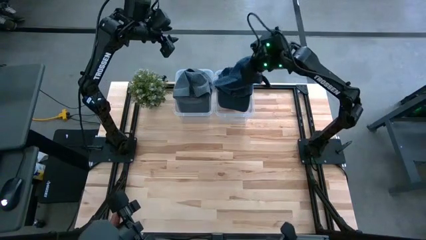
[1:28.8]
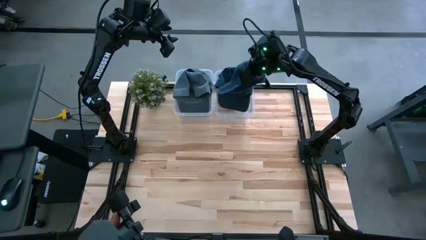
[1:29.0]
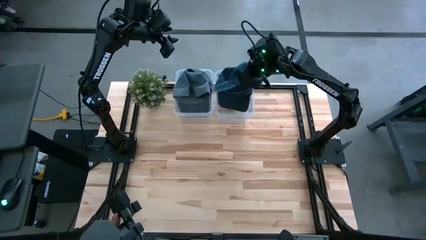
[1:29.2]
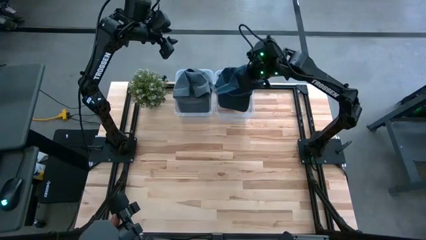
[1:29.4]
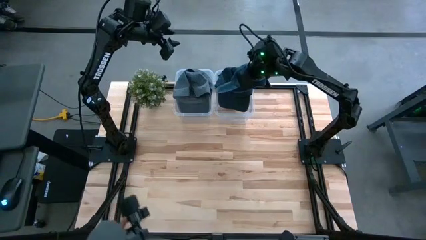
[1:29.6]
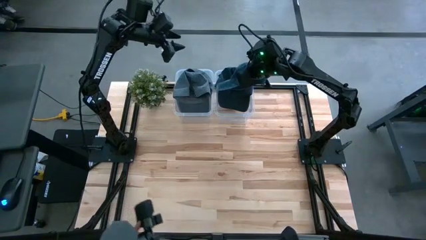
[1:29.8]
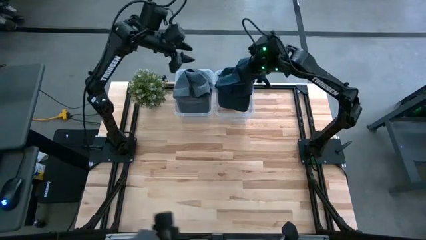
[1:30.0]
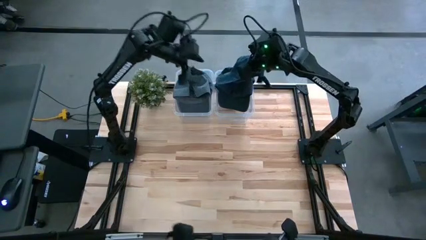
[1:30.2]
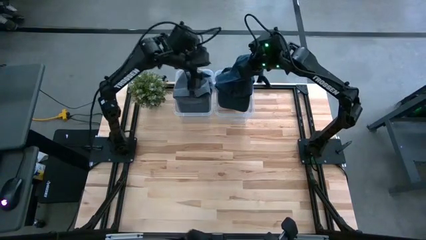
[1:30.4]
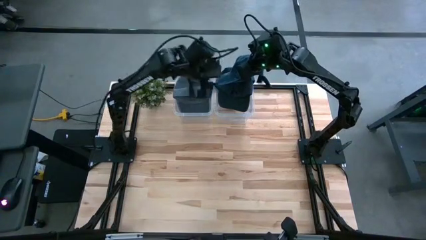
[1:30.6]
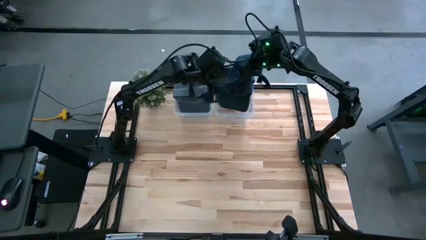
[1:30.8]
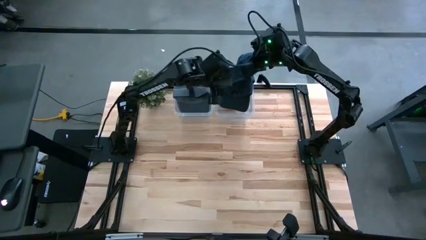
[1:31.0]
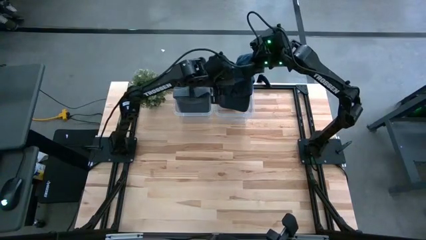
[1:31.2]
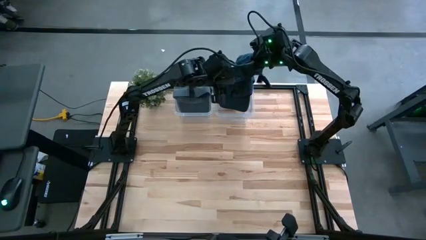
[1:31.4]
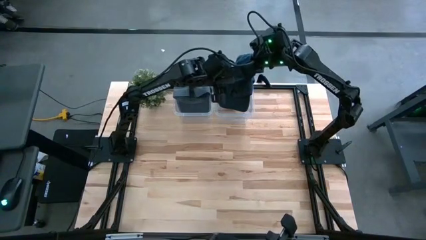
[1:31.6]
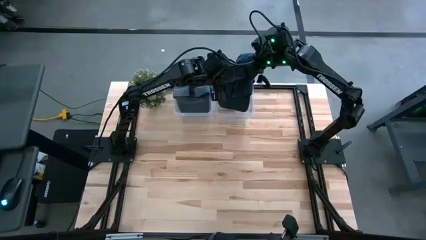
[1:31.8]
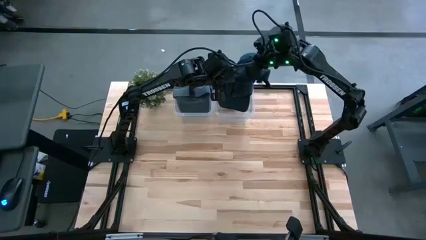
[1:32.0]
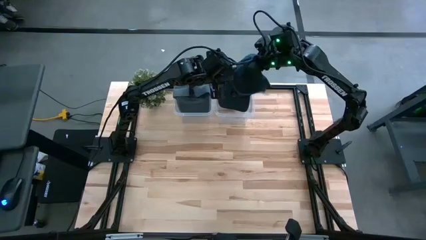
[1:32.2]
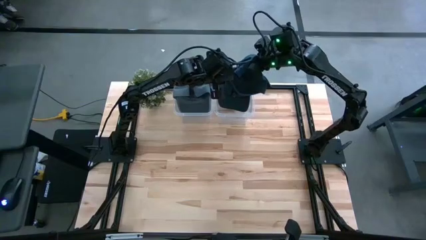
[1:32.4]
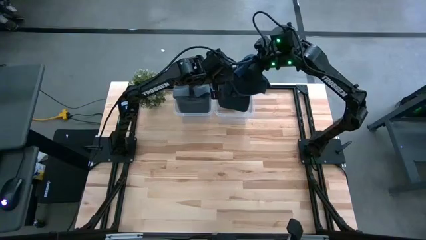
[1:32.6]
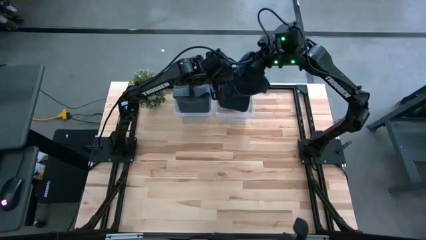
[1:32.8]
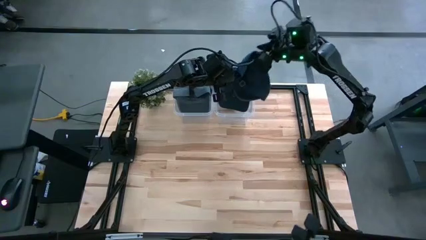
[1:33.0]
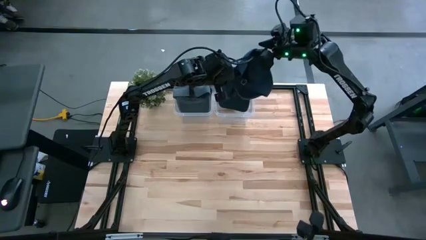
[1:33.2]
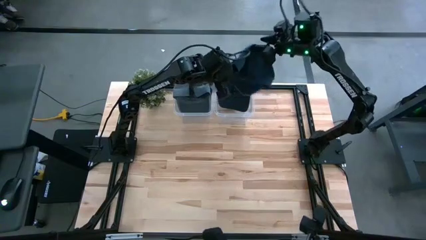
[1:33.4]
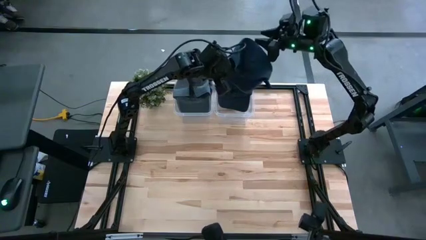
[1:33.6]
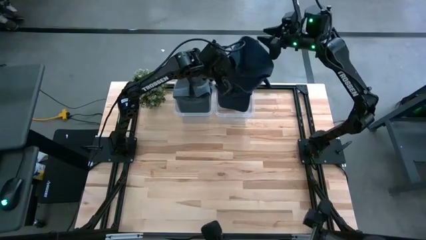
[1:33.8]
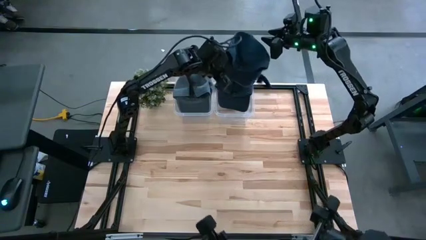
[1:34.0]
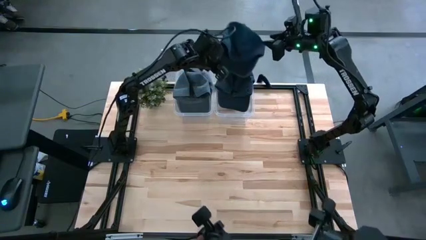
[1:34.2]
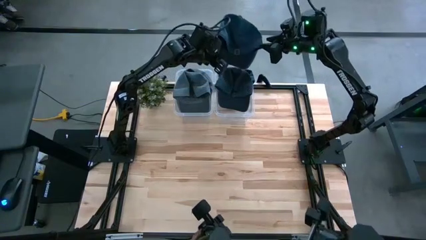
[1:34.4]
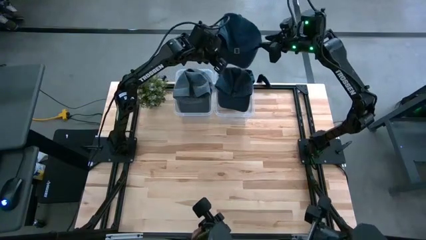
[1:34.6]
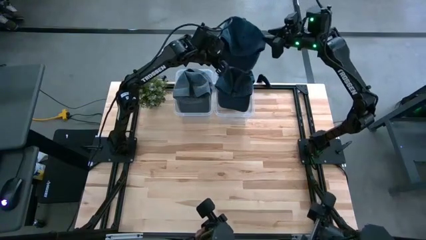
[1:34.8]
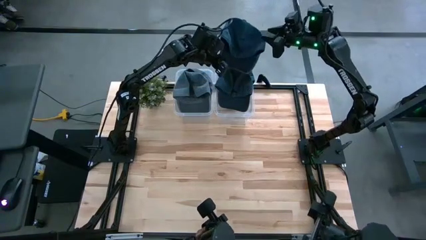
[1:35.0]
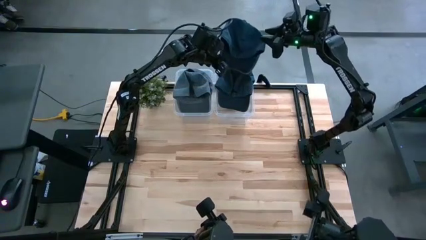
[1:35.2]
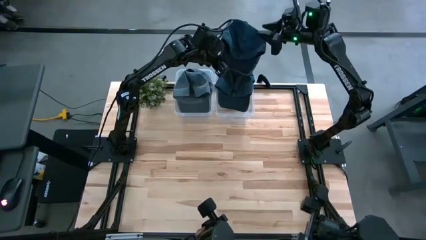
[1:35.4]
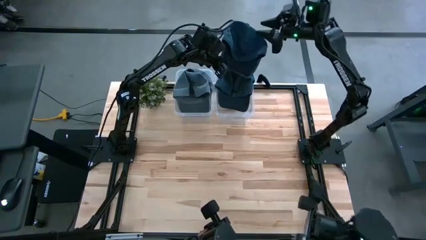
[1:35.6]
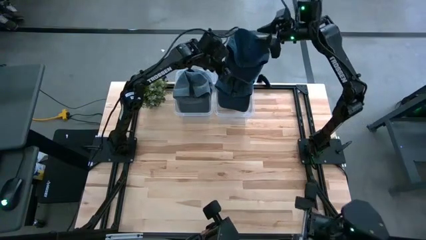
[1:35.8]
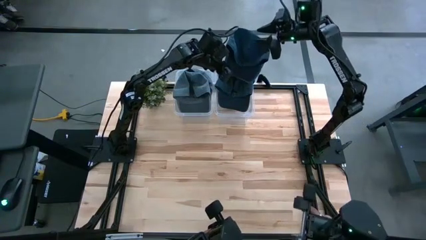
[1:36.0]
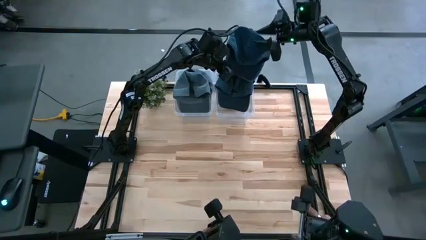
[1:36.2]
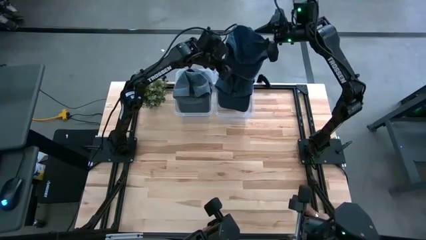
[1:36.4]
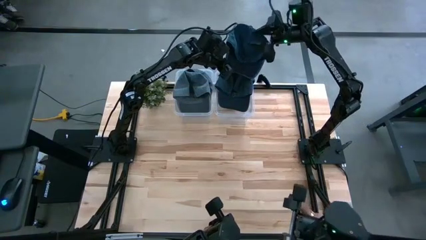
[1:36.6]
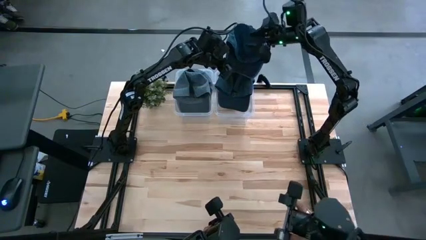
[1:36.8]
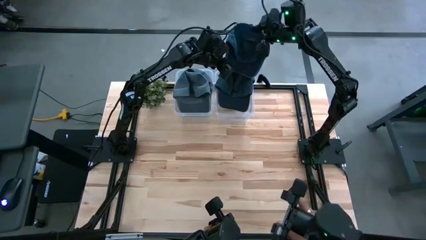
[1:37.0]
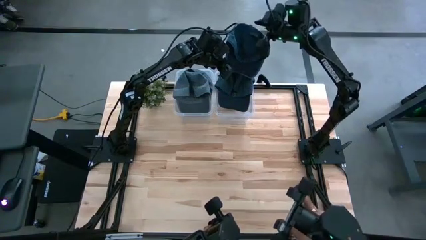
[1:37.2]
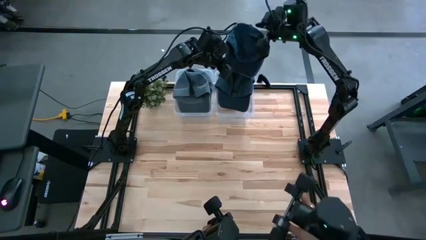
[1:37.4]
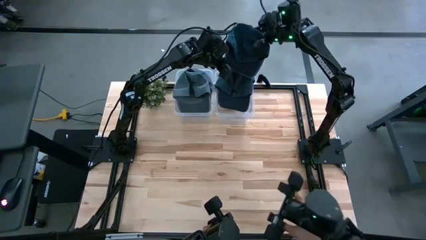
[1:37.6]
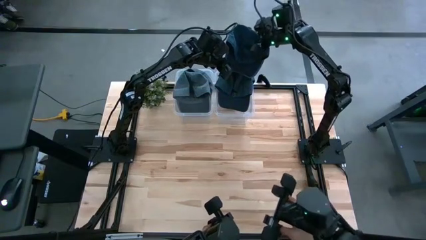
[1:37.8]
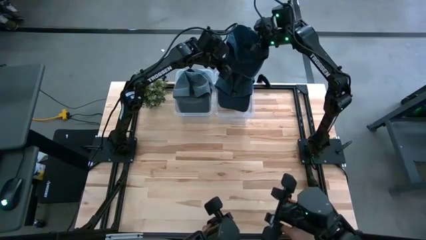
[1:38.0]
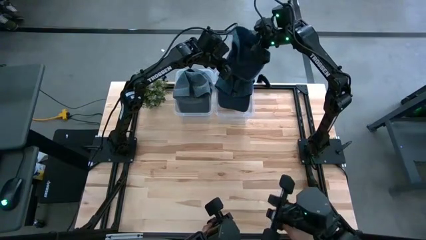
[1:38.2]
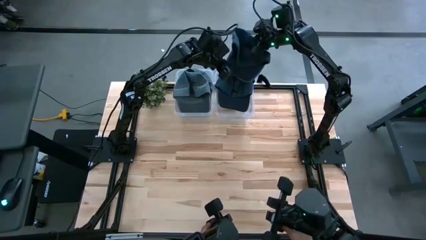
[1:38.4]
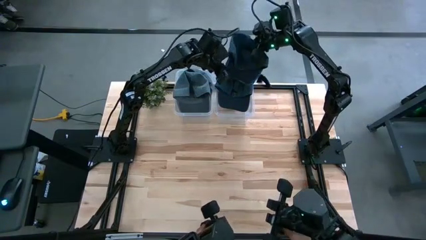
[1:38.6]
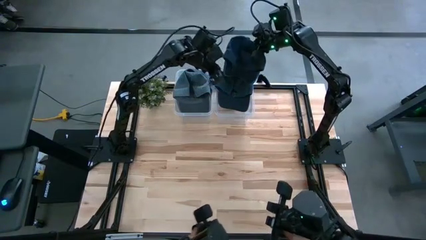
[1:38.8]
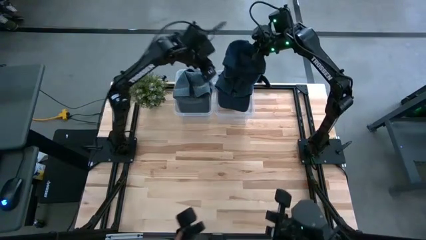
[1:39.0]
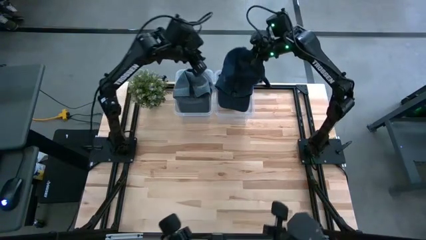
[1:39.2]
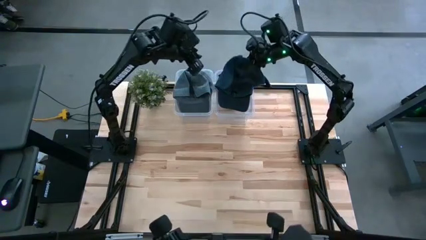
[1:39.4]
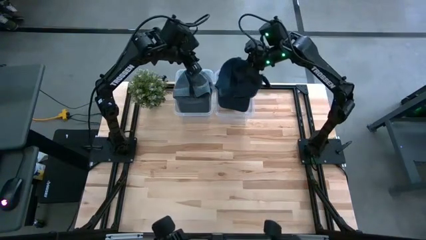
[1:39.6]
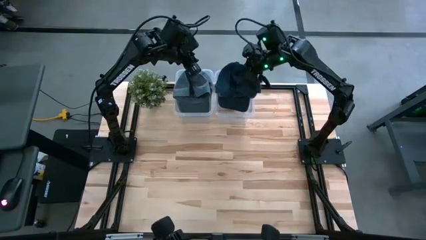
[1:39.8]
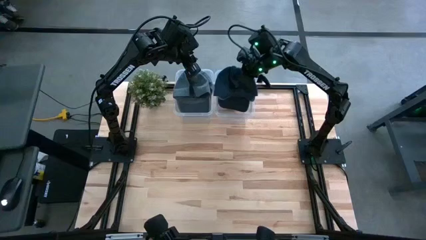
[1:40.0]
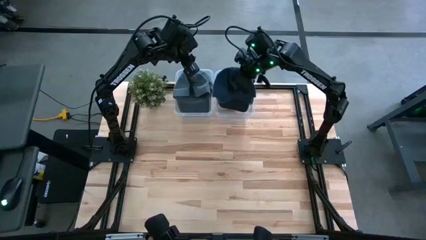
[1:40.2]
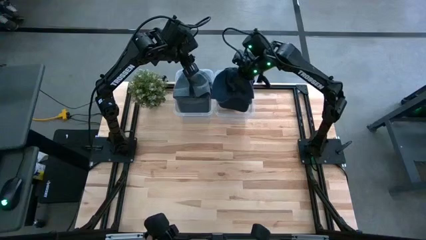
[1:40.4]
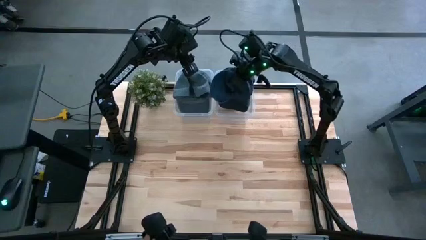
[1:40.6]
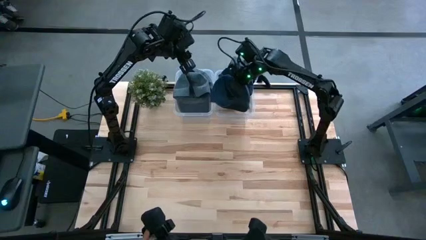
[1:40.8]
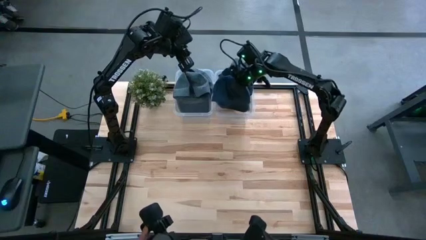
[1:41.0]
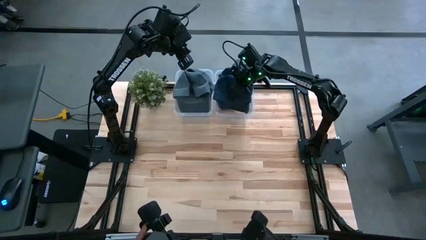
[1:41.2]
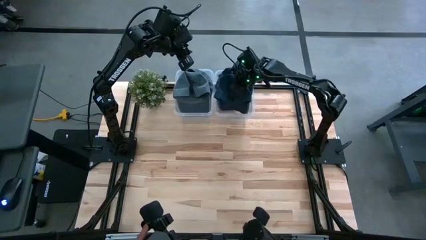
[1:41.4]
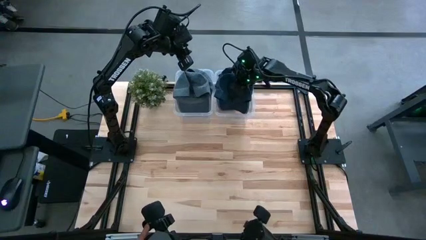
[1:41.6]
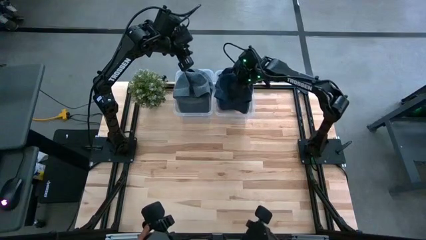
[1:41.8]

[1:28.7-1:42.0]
Task: Pick & Place hat
Put the blue cap into the right transparent bin

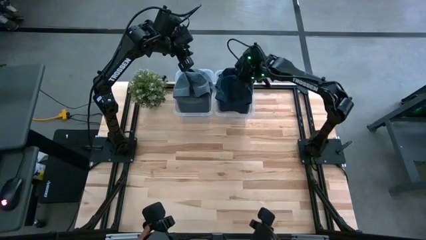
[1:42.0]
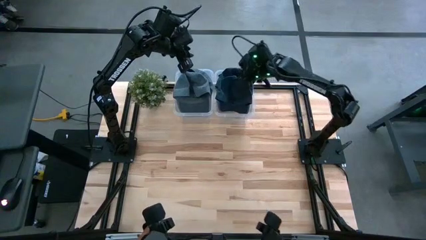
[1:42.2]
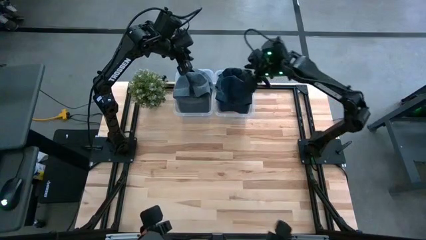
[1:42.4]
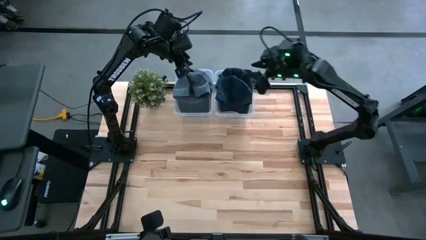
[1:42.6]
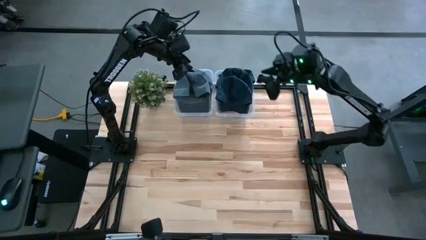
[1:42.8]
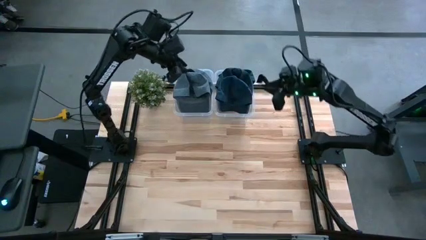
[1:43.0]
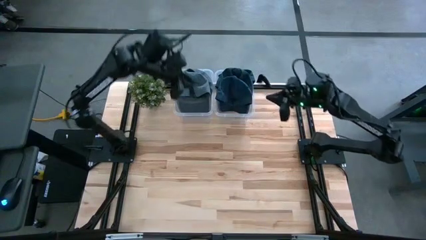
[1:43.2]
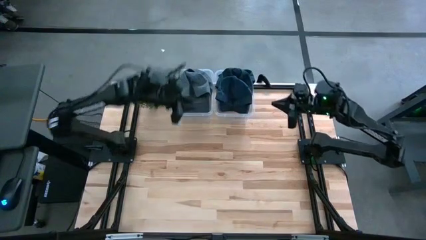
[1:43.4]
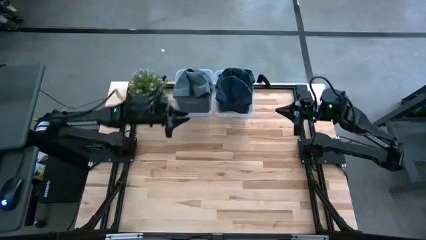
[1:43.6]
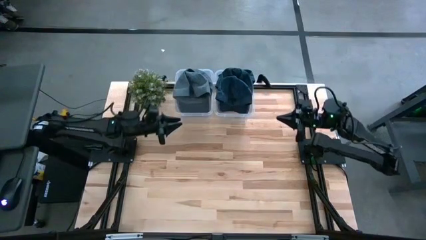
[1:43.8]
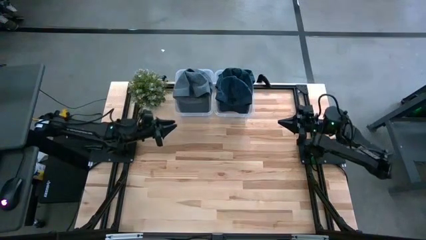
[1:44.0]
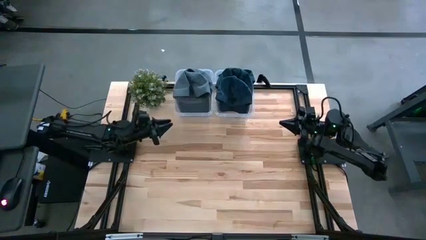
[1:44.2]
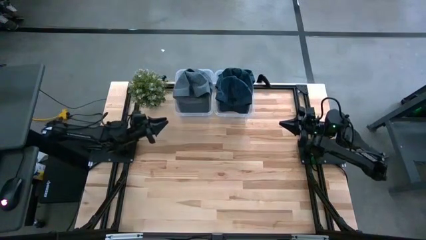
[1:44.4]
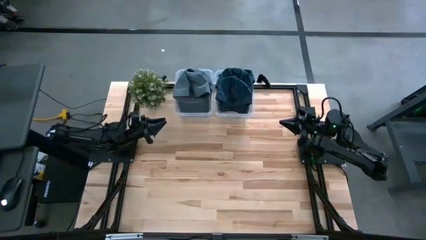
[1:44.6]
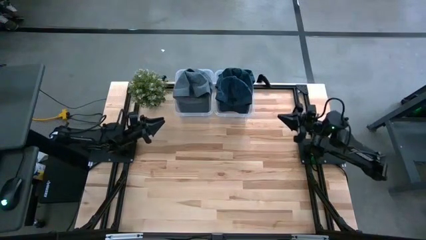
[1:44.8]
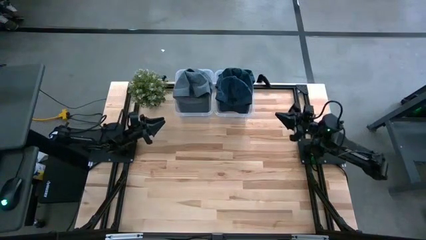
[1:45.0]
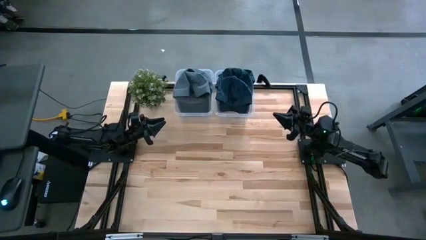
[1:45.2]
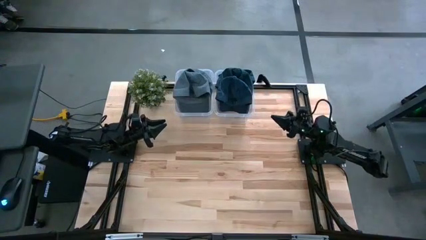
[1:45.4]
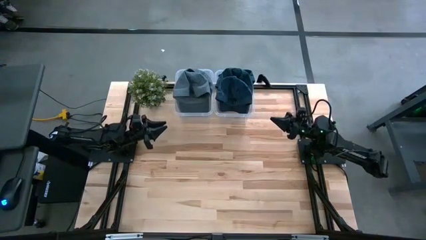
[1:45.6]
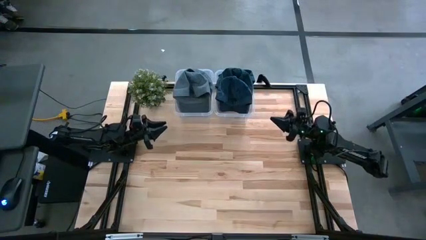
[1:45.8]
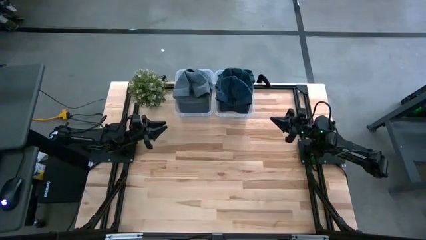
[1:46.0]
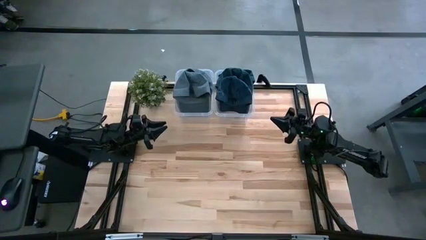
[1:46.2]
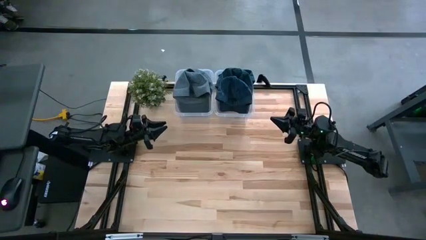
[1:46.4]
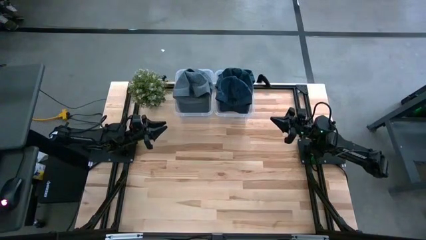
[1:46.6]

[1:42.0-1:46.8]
Return to Home Position
